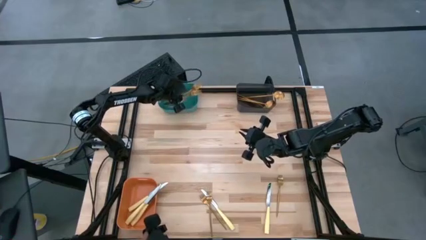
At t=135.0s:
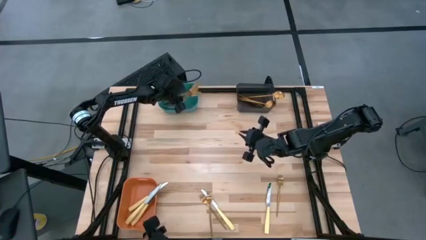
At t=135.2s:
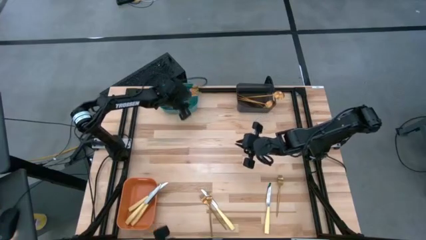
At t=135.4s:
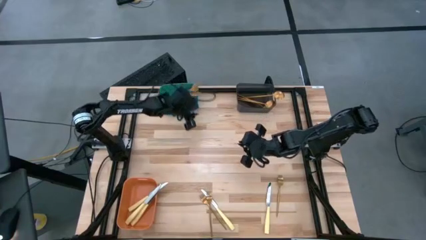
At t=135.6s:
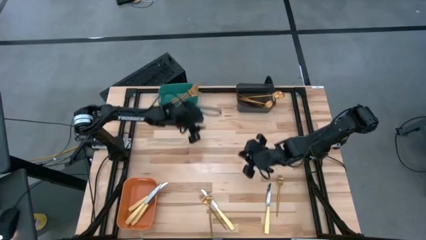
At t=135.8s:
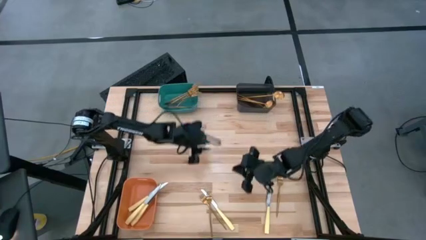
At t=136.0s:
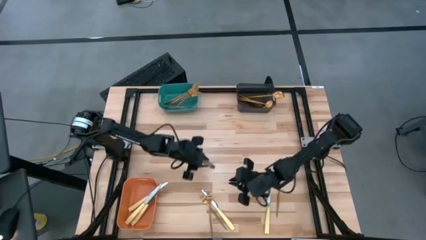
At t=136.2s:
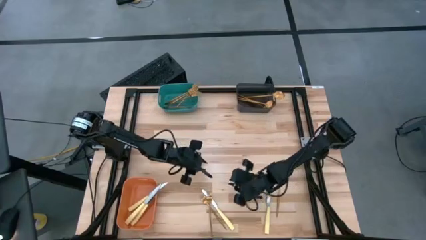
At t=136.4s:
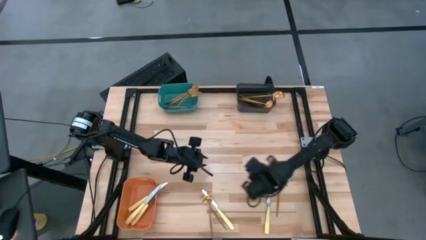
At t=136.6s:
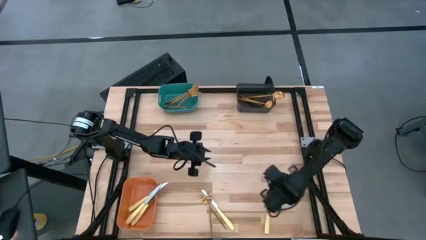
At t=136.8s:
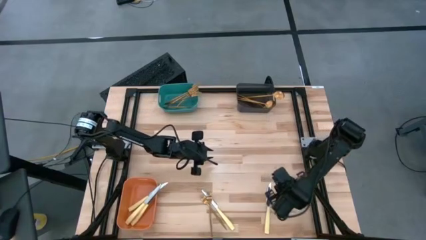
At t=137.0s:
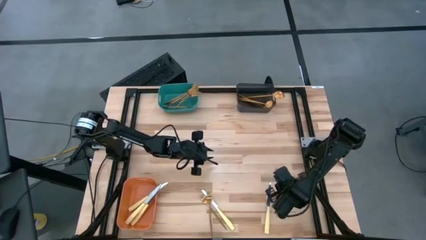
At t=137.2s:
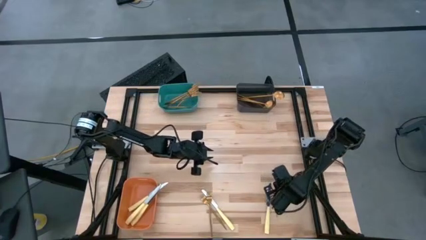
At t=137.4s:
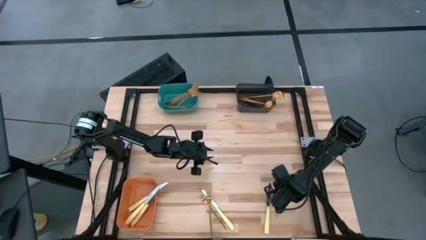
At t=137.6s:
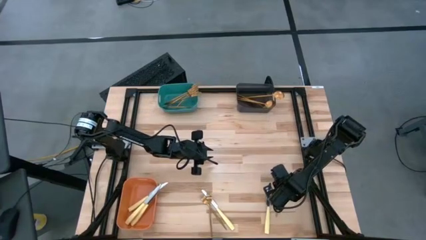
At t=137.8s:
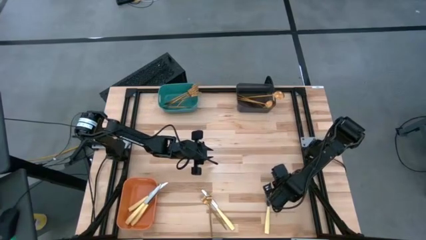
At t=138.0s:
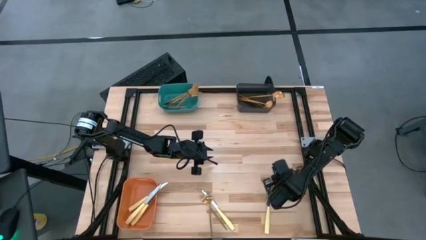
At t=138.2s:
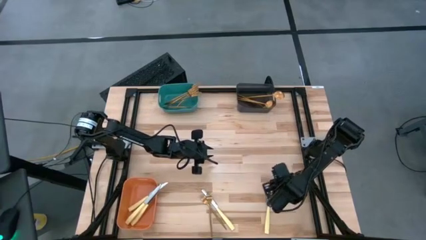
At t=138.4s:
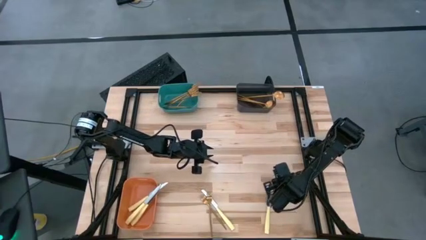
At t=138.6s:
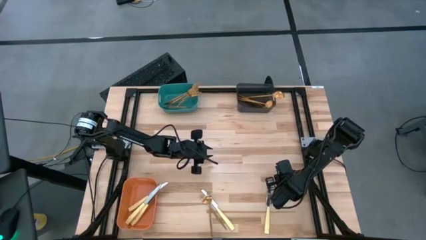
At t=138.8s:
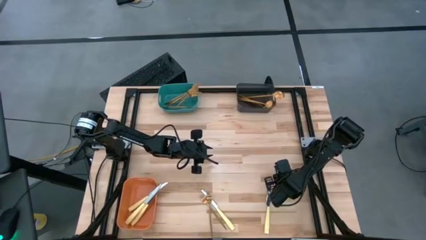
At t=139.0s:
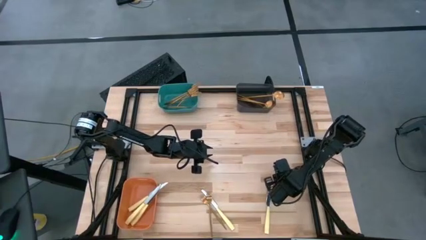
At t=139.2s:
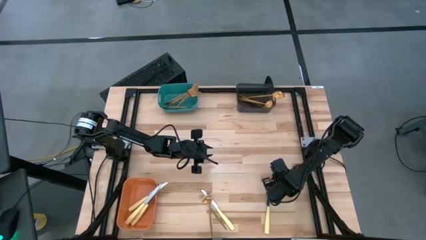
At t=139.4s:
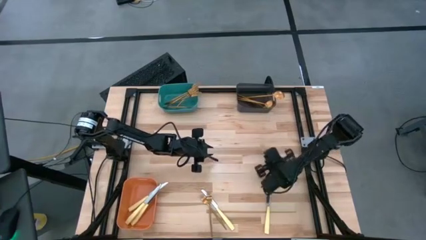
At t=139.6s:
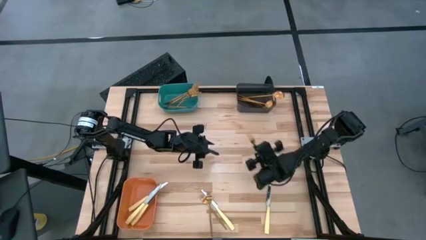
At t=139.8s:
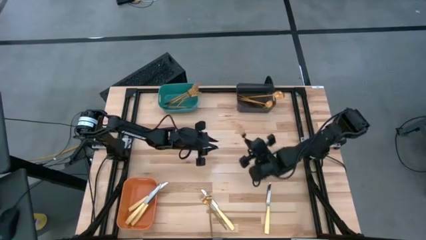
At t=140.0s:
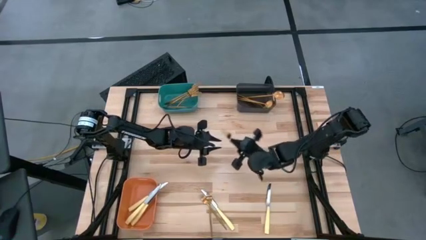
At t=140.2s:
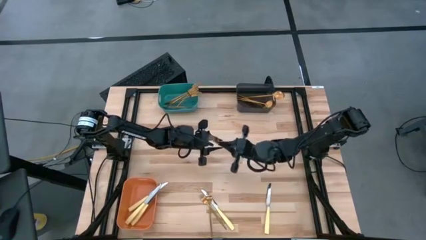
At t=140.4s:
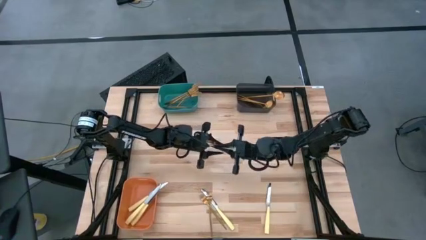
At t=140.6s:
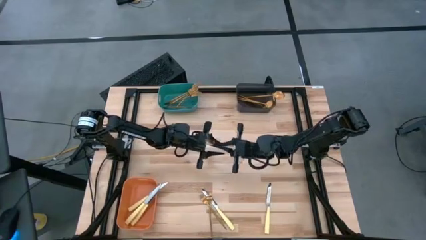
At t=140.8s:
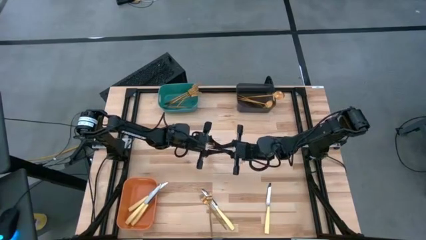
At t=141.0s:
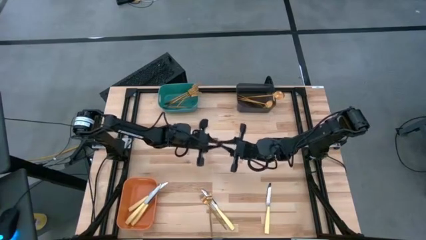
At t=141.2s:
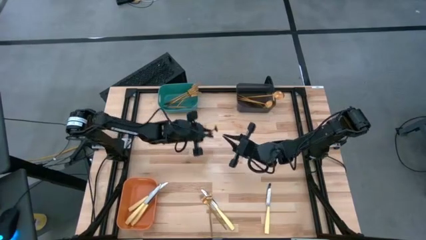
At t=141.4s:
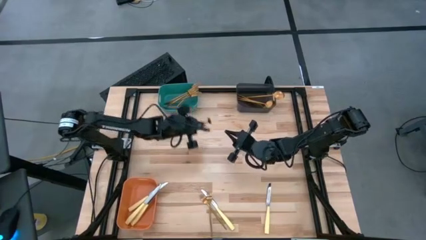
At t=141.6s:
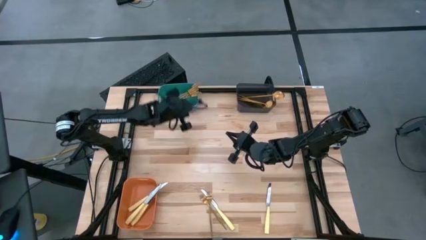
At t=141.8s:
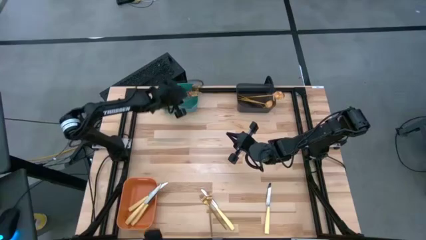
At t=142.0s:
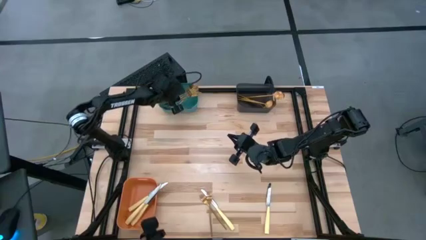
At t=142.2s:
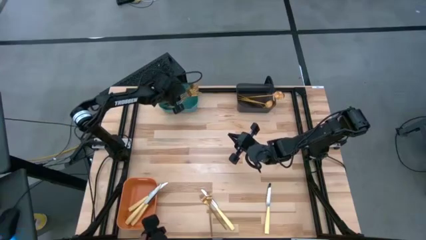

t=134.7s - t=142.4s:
Task: Sort silverware by color (type)
Put the gold fork into the green bin

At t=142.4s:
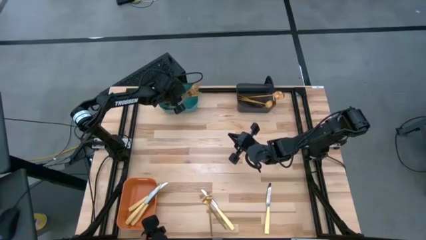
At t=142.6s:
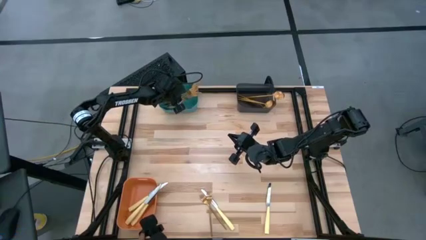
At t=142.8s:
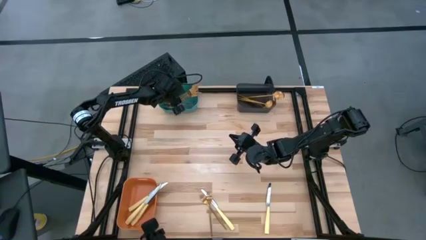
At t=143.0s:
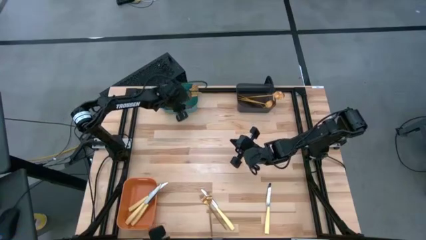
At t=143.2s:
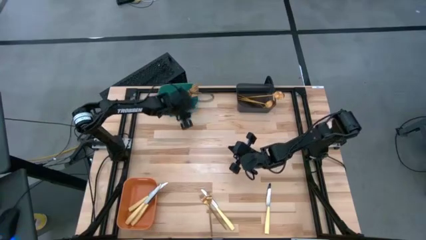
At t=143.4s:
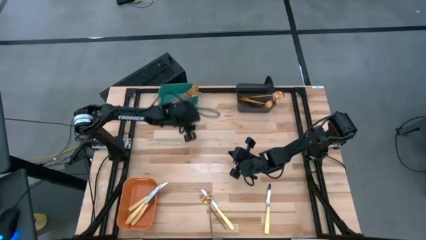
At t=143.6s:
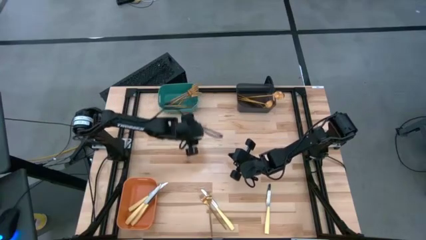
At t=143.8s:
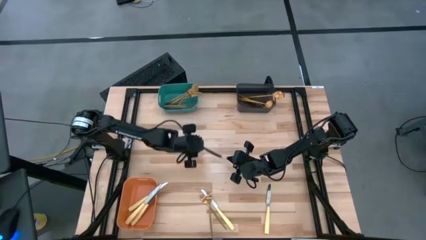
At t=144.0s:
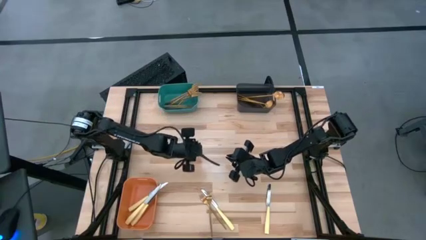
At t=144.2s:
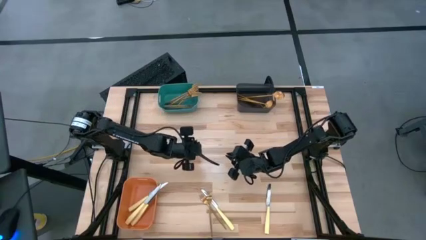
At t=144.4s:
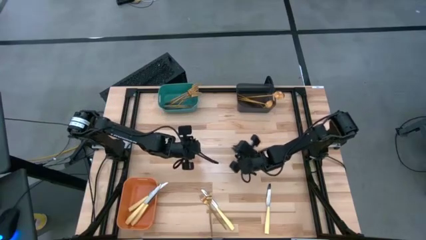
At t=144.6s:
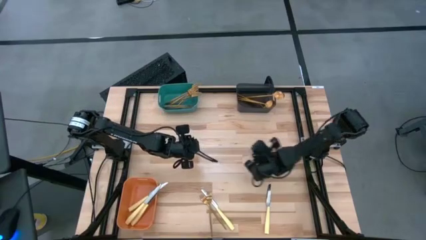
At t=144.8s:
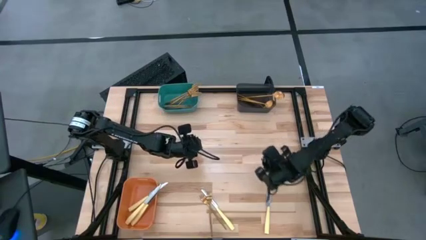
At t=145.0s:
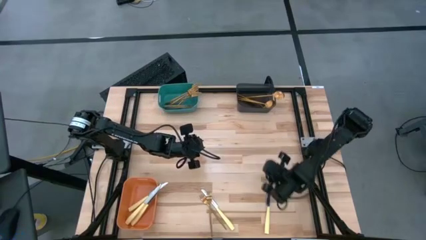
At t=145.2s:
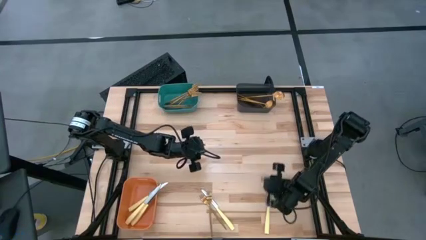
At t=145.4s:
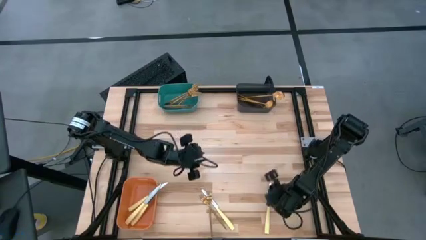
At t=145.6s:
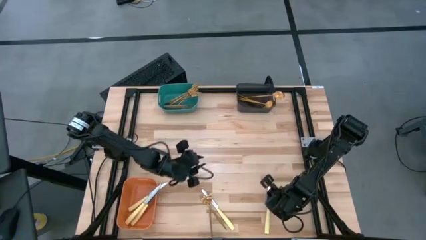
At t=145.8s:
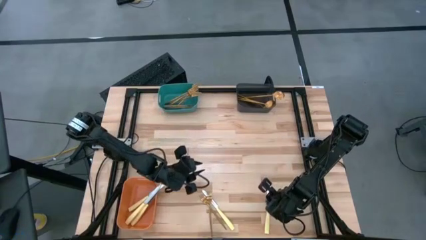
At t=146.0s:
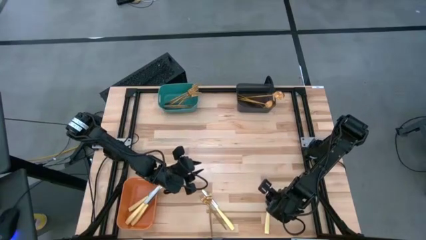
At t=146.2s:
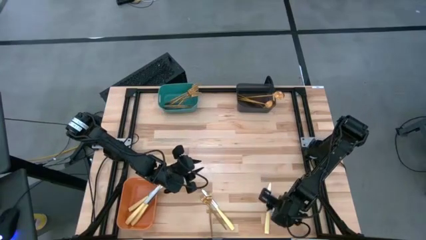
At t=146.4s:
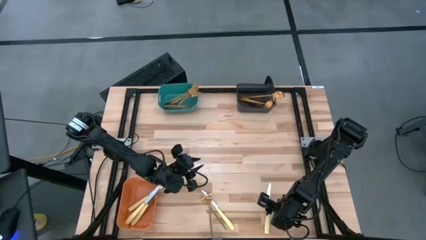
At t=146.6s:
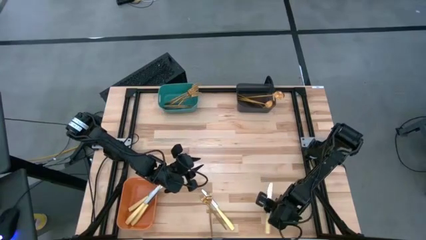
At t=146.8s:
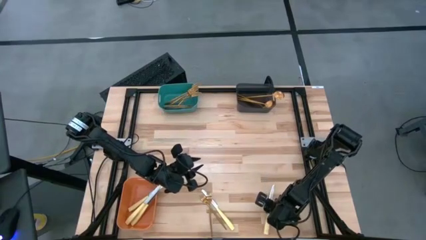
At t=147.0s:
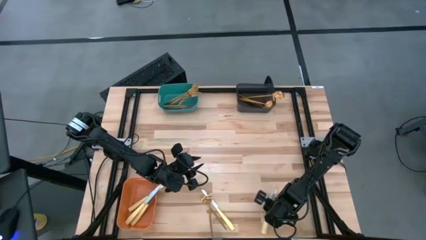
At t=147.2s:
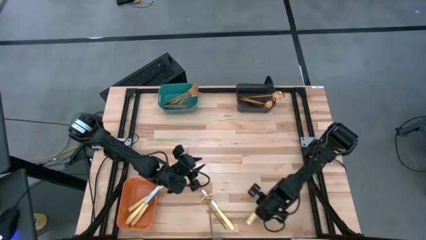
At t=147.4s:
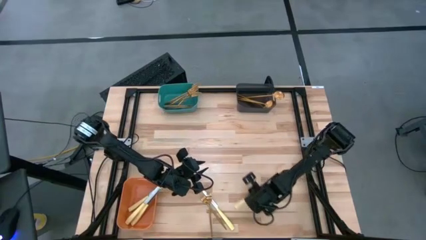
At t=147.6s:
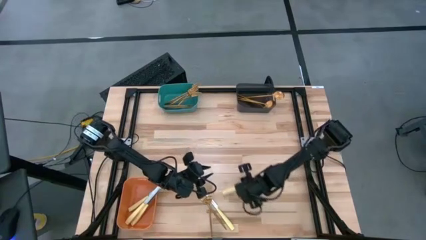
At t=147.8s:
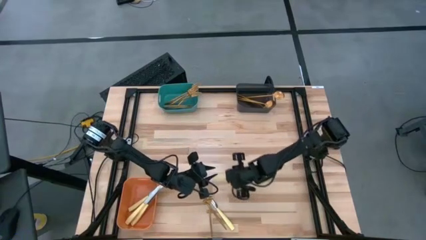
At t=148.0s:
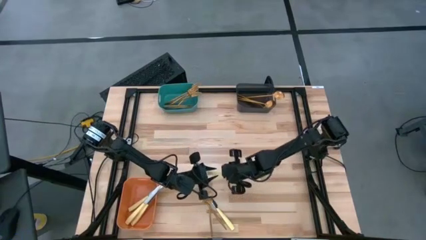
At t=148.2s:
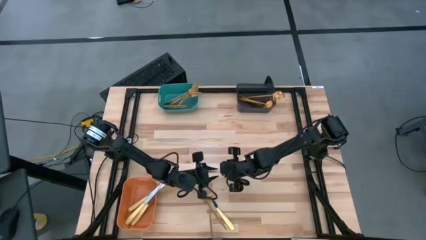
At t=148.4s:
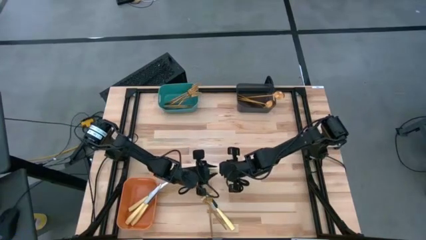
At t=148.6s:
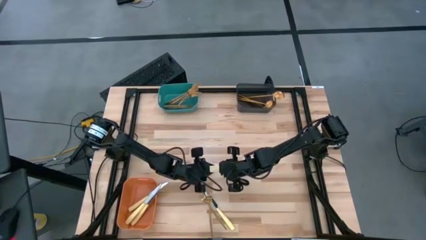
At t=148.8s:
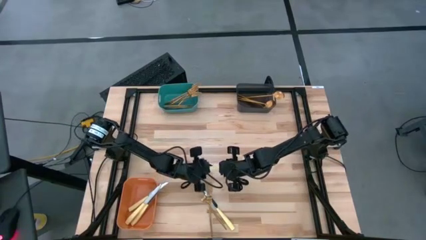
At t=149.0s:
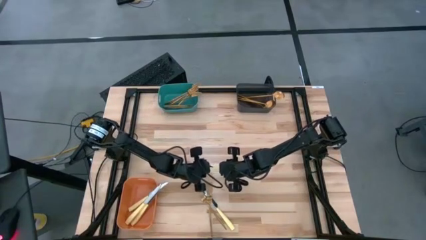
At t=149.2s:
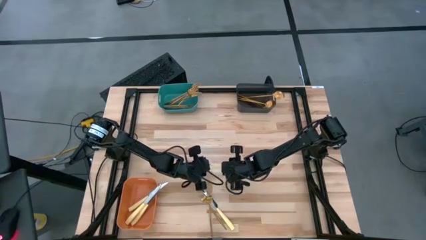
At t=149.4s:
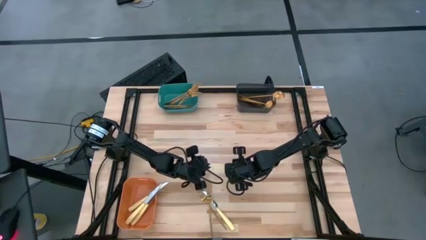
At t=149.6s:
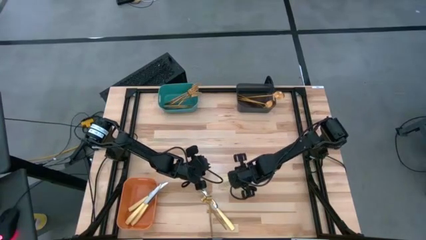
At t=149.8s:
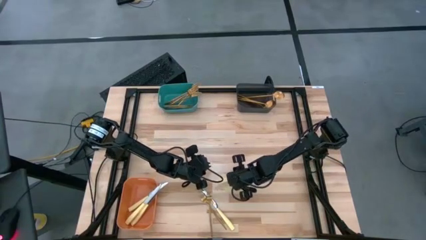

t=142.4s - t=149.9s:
Put the yellow table knife into the orange bin
